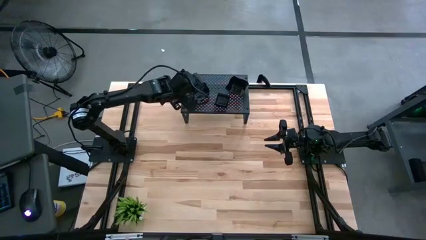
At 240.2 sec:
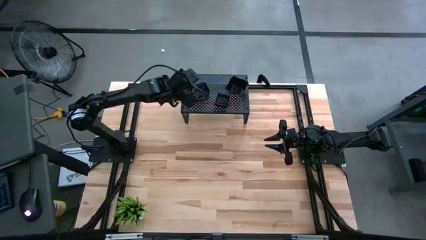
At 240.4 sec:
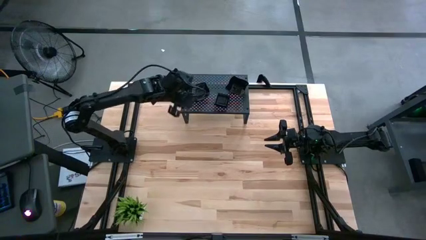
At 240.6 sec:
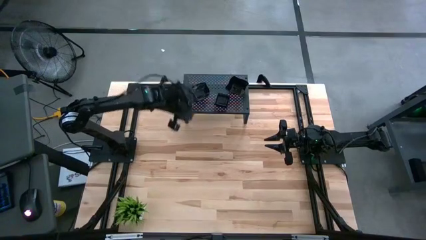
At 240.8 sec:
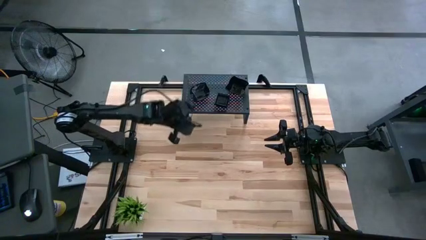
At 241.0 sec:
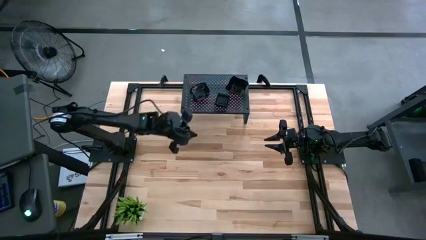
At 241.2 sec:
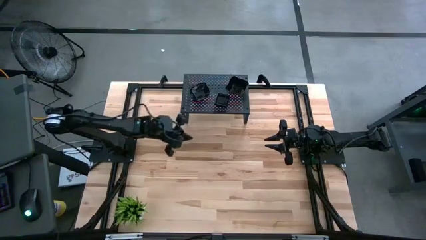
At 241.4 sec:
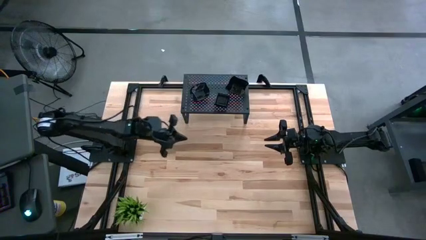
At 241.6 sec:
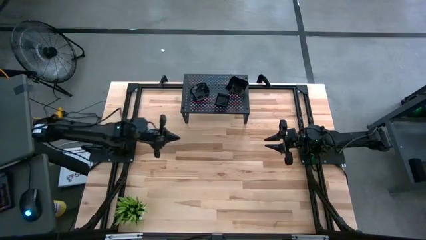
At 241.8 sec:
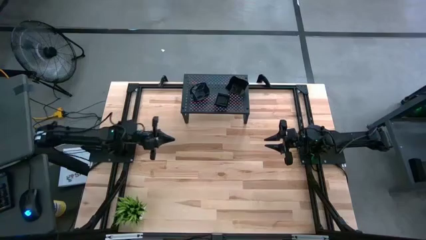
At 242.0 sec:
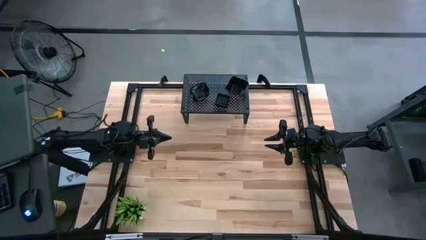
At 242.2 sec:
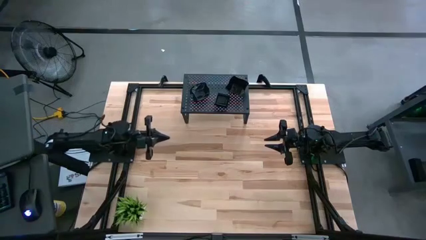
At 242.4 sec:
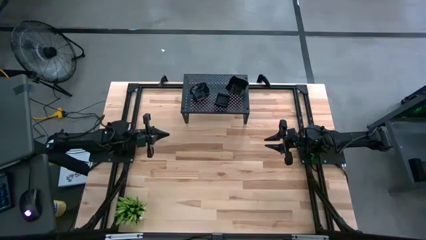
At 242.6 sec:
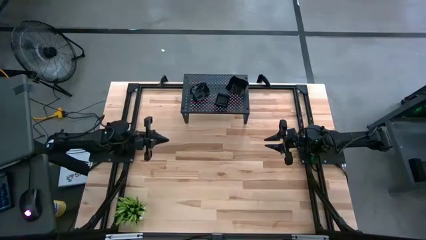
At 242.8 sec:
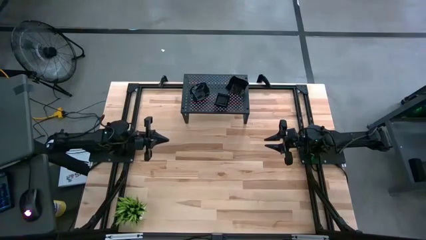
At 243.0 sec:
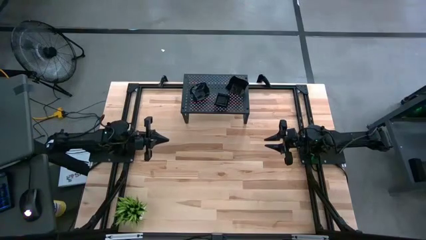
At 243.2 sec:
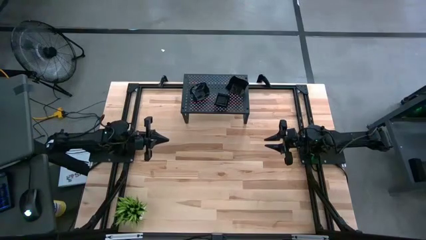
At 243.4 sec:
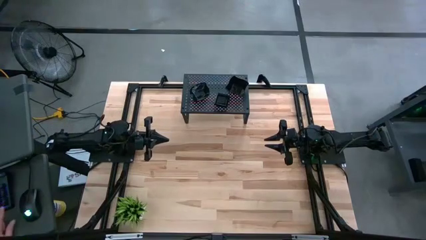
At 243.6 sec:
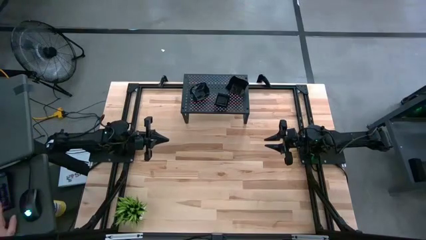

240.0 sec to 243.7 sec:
Task: Pick & Place Mini shaped plates
Return to Home Position

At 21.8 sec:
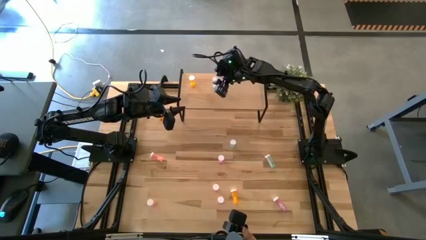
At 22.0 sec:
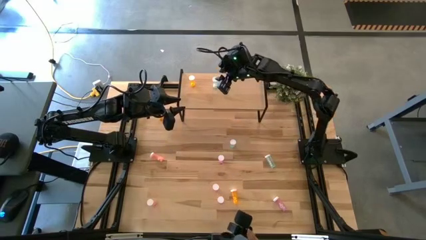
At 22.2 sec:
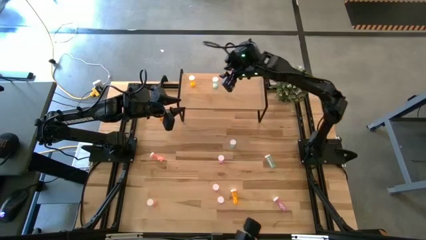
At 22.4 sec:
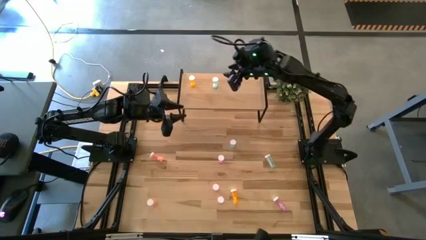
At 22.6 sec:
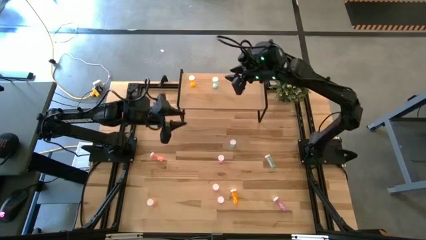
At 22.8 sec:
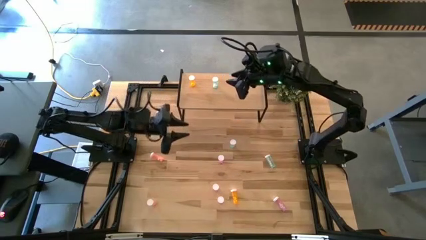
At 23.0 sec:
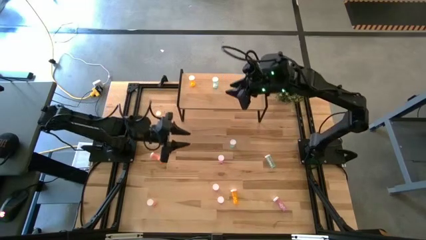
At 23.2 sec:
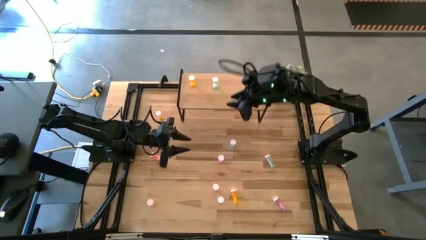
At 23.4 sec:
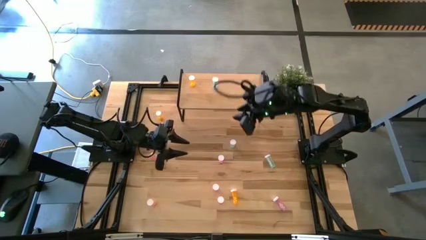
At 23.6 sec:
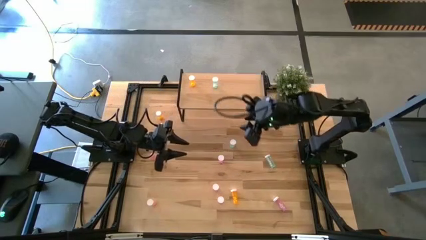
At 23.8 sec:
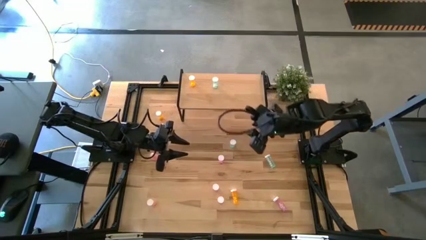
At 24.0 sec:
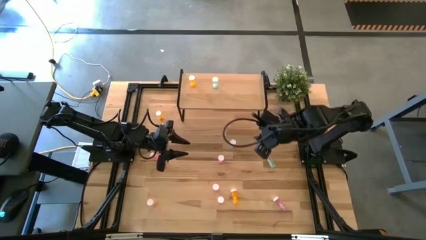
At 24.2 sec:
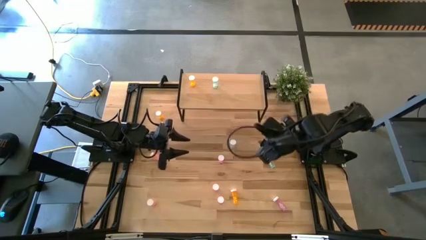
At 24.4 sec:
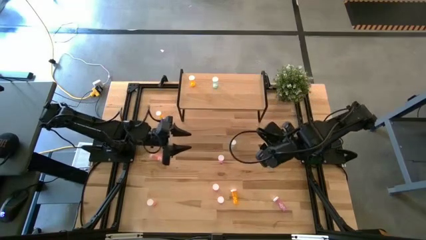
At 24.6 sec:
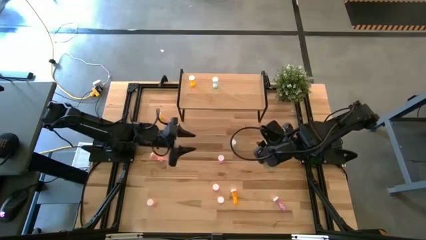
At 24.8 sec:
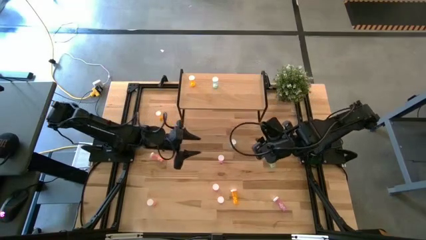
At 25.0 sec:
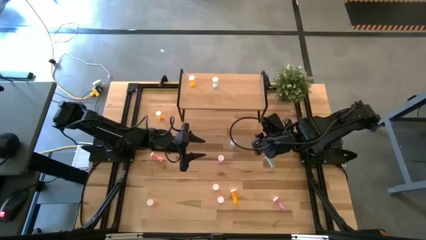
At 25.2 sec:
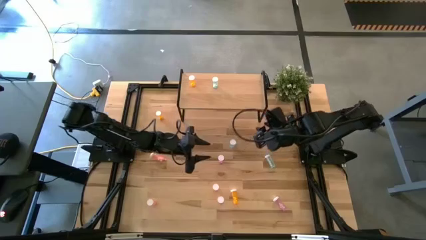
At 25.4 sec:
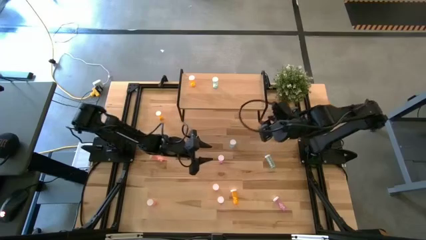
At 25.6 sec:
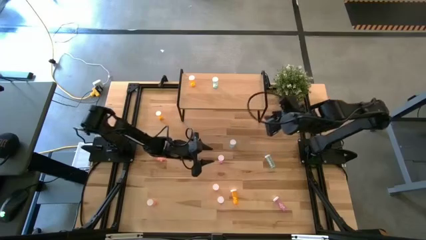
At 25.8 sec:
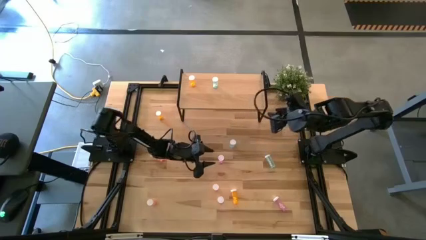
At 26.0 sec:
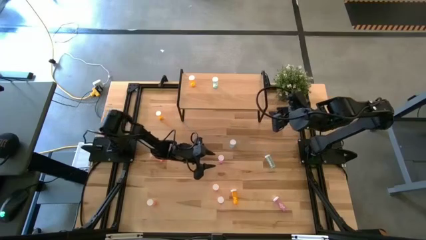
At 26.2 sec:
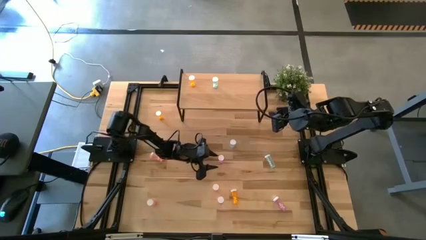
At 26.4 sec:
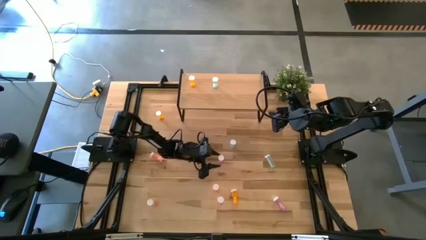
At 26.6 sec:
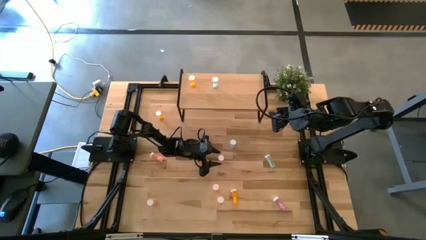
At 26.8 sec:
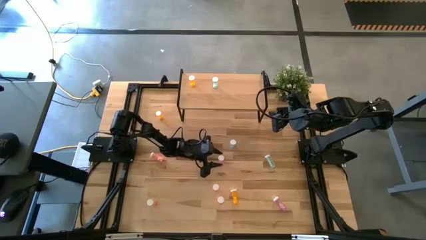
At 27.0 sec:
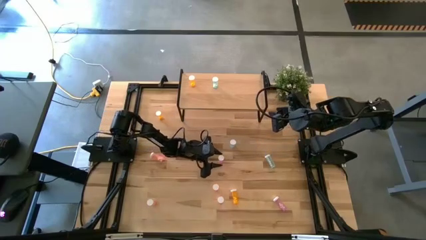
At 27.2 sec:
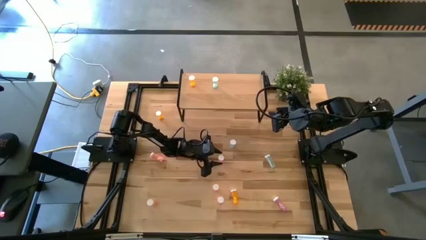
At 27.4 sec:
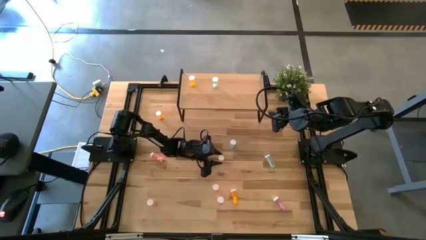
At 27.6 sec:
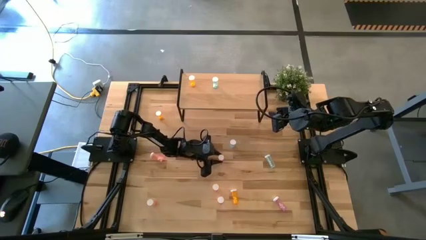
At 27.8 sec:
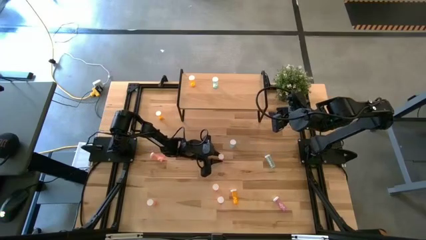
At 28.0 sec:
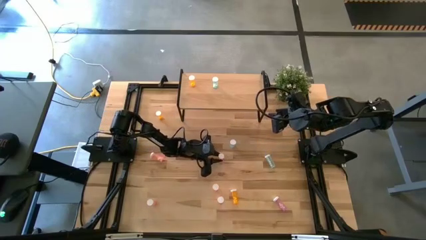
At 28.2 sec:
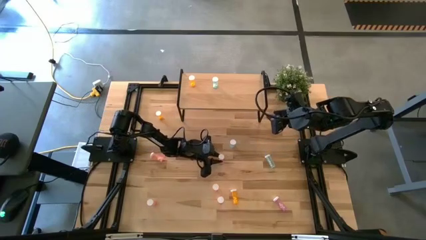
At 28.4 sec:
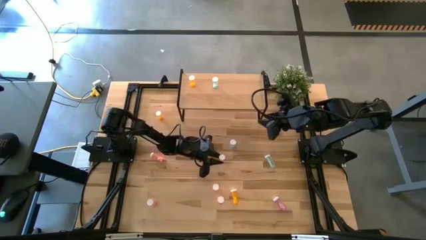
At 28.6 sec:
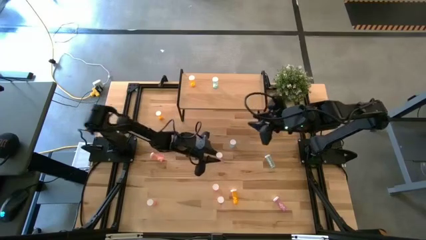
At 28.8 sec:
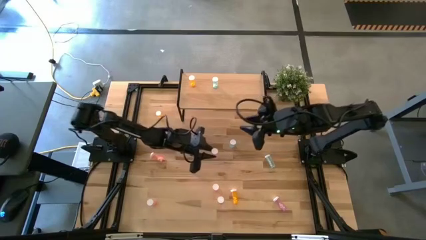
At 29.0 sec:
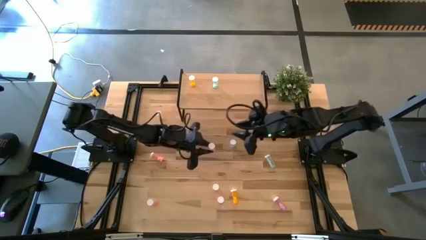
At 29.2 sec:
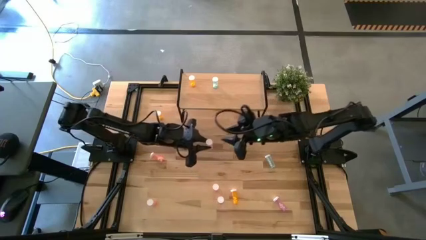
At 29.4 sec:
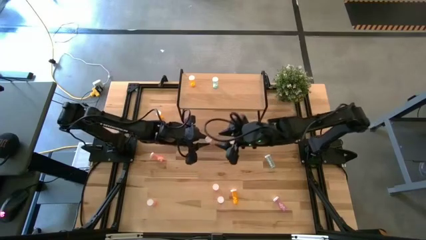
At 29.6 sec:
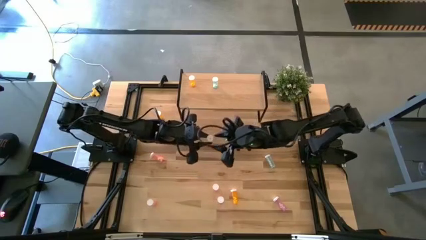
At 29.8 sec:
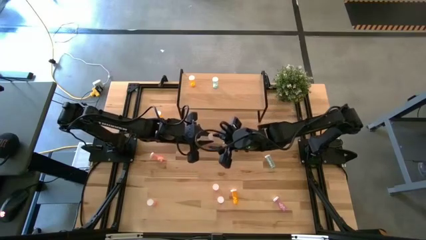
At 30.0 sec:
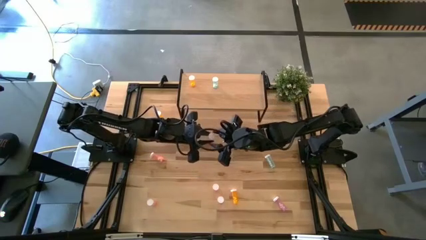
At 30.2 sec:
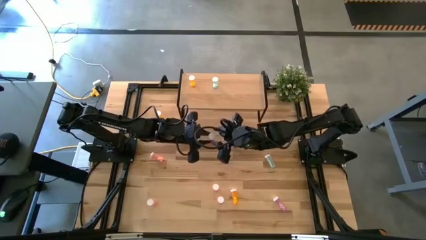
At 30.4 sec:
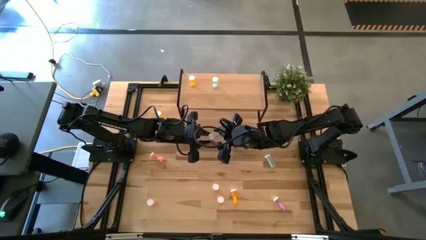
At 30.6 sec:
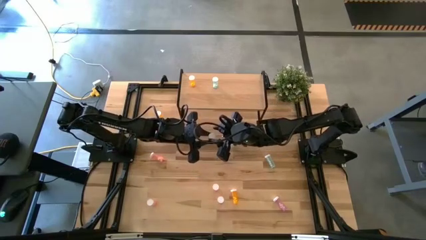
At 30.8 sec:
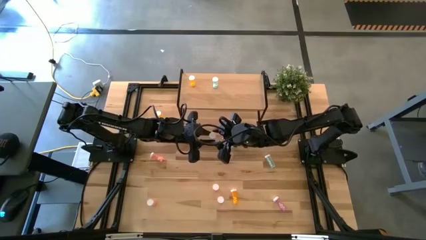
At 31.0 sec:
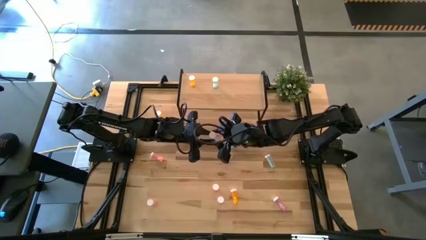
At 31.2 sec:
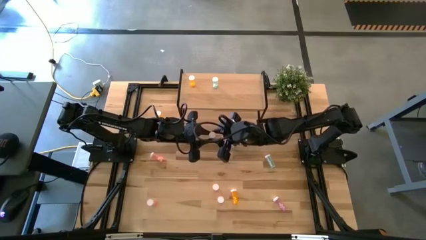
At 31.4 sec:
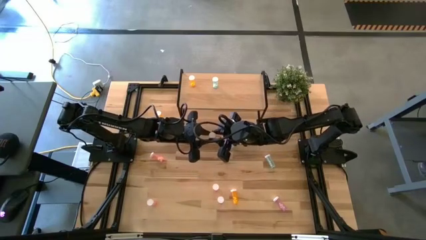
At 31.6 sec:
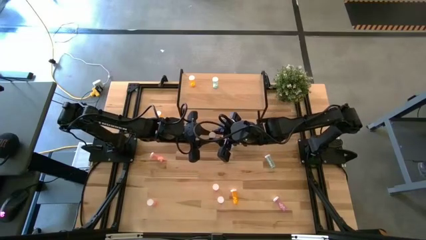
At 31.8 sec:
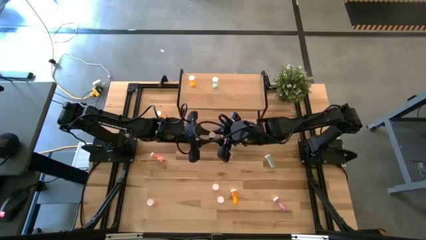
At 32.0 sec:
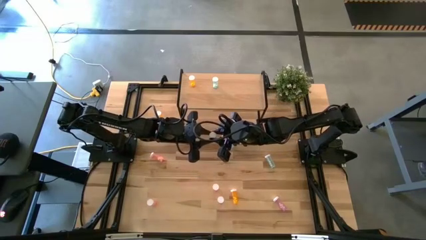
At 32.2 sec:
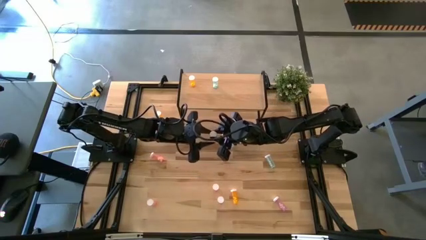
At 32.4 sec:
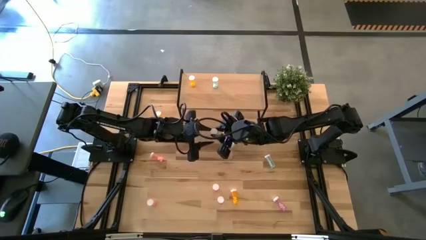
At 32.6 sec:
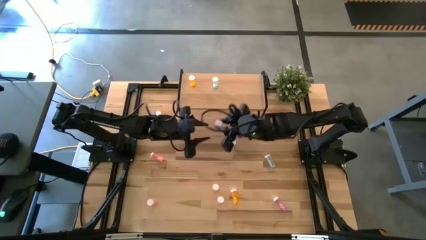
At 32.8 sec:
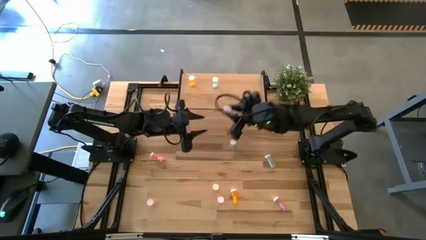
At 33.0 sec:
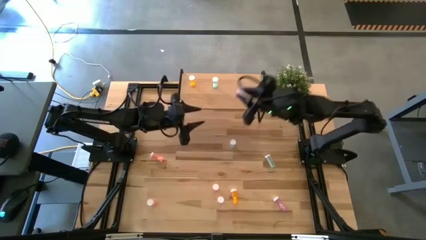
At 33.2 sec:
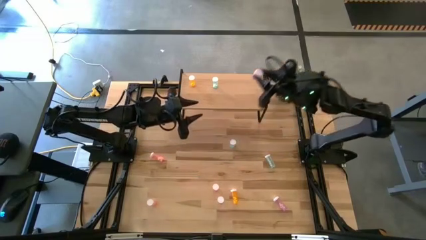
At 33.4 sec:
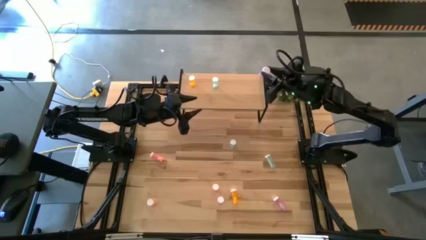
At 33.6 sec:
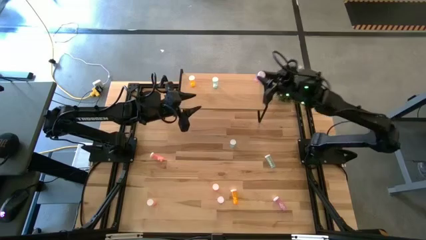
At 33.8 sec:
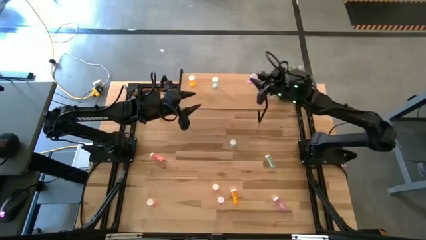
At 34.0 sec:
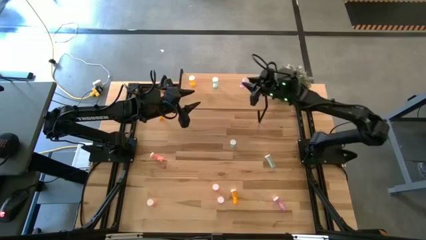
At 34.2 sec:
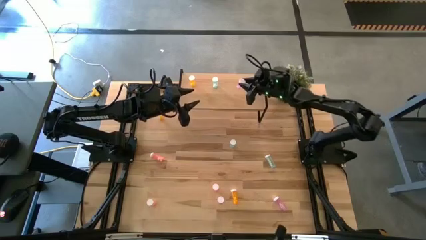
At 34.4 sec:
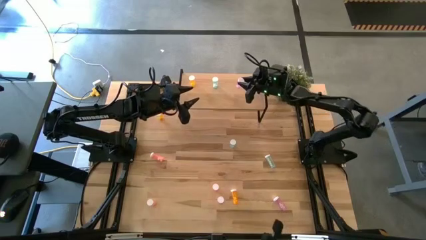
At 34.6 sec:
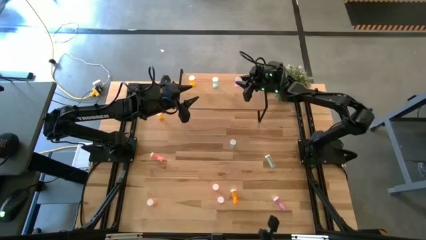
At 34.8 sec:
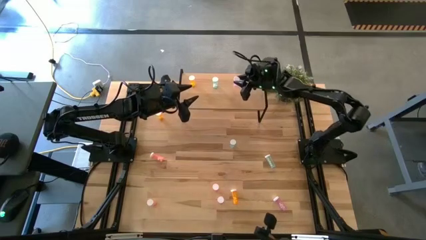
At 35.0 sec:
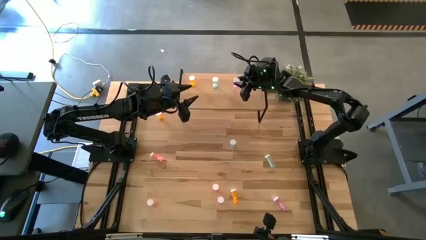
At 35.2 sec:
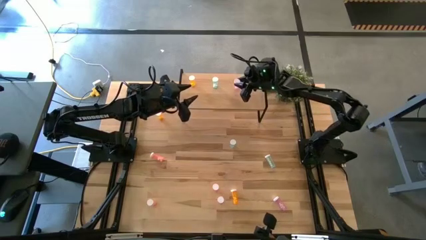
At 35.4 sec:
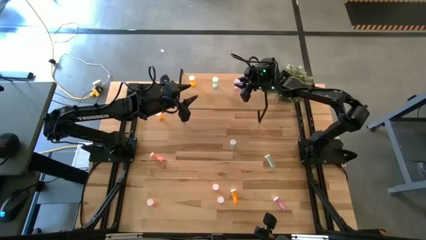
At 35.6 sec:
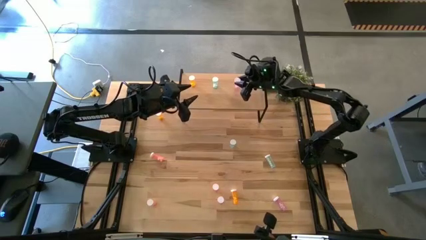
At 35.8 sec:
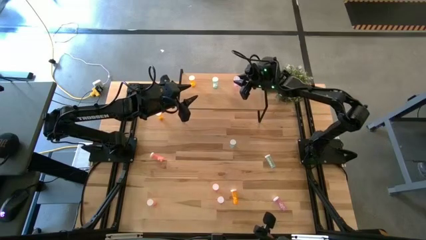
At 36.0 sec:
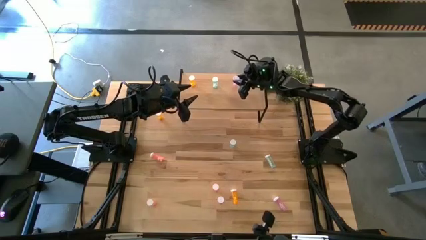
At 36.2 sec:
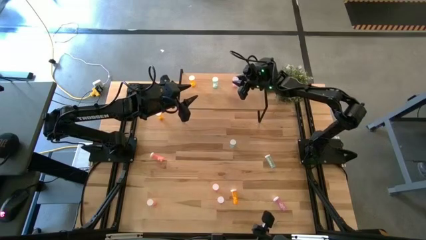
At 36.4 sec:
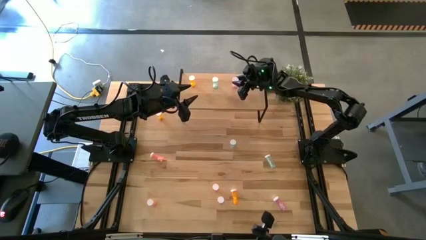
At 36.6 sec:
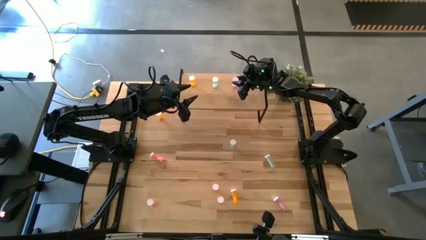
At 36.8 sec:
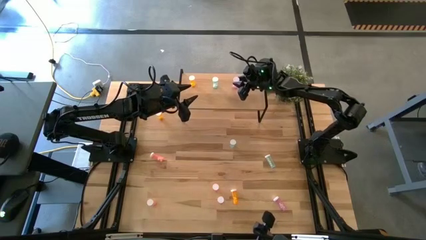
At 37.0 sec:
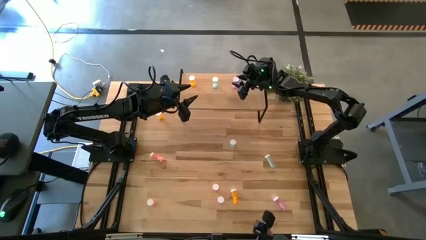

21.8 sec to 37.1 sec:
Task: Pick and place medicine bottles onto shelf by color
Put the top left purple pill bottle on the shelf
